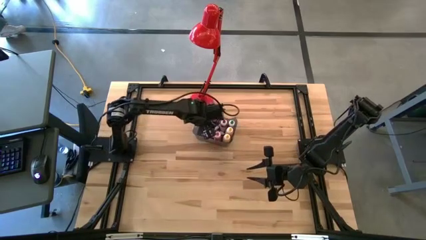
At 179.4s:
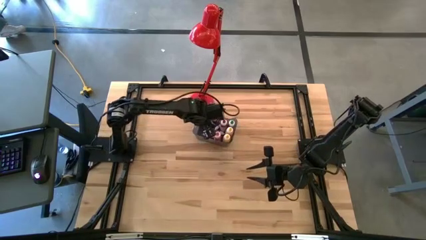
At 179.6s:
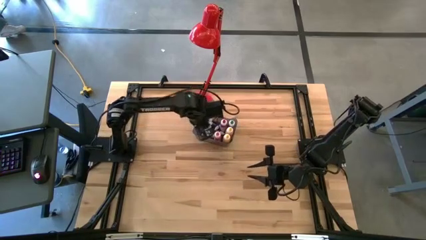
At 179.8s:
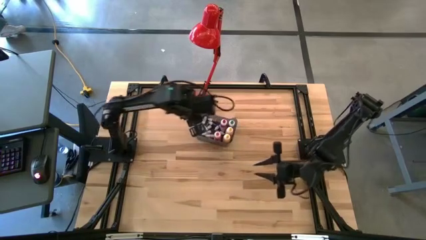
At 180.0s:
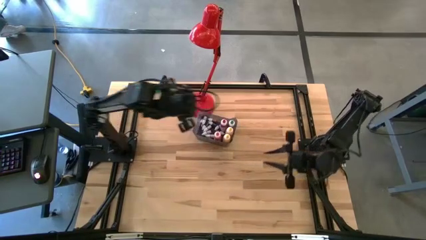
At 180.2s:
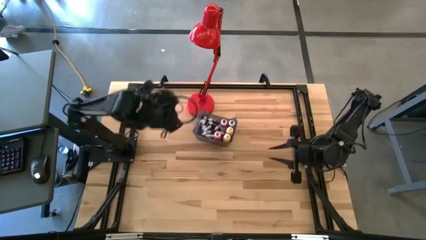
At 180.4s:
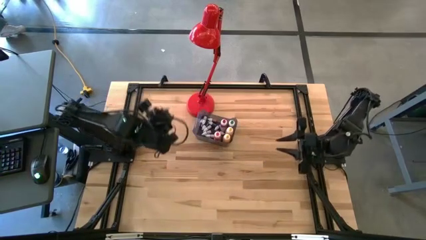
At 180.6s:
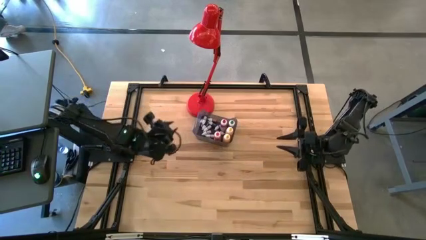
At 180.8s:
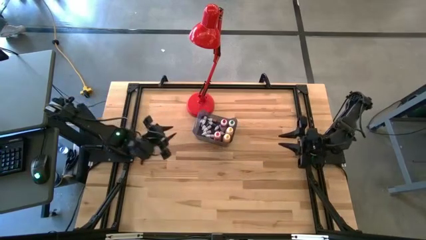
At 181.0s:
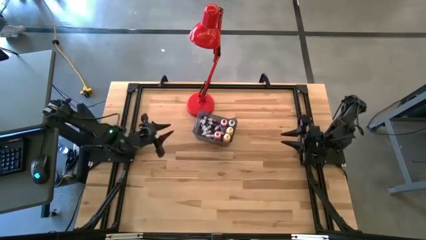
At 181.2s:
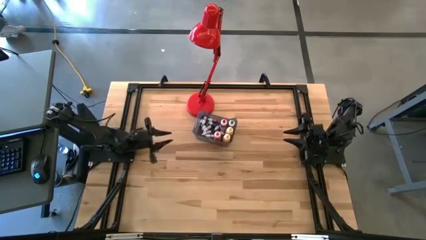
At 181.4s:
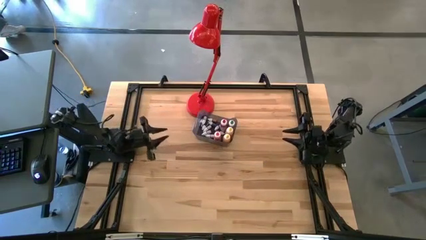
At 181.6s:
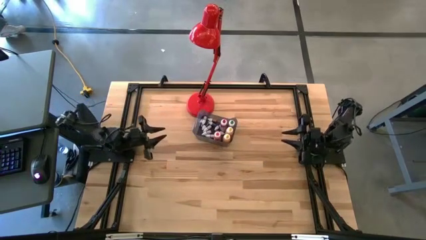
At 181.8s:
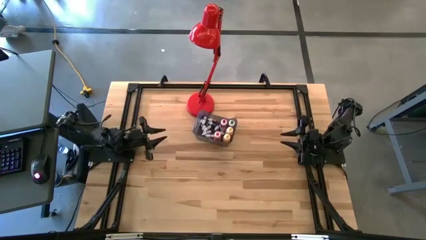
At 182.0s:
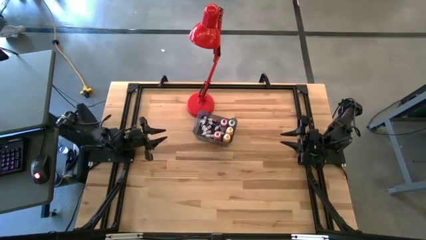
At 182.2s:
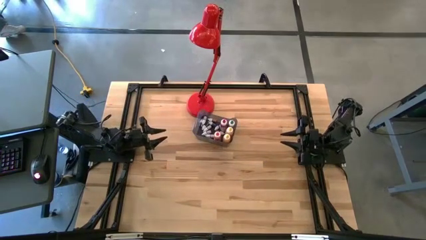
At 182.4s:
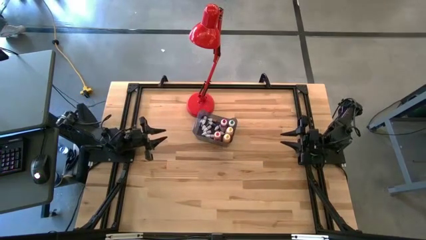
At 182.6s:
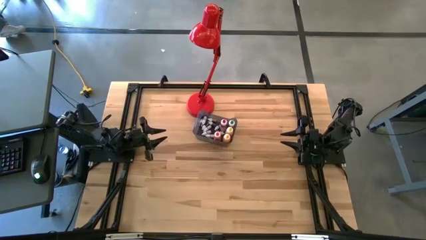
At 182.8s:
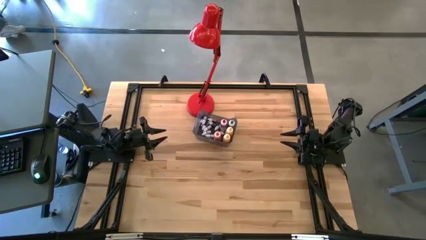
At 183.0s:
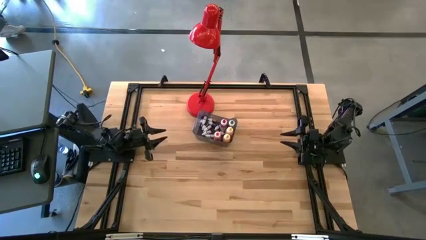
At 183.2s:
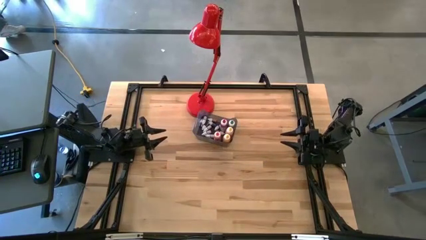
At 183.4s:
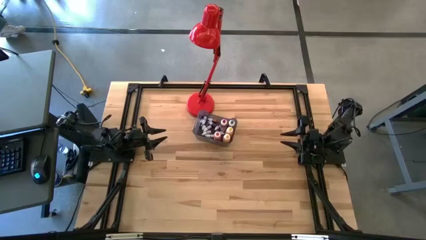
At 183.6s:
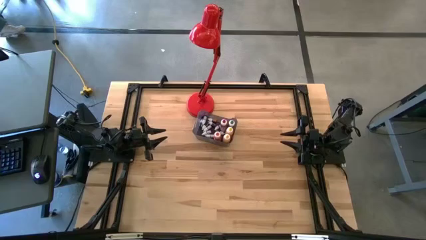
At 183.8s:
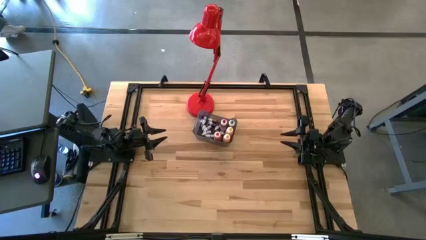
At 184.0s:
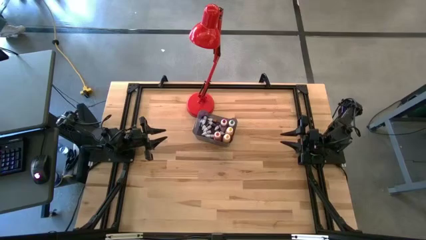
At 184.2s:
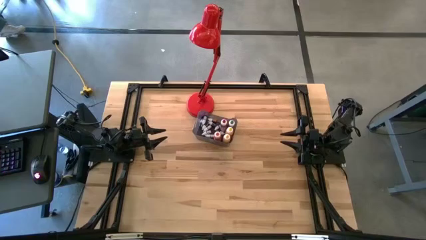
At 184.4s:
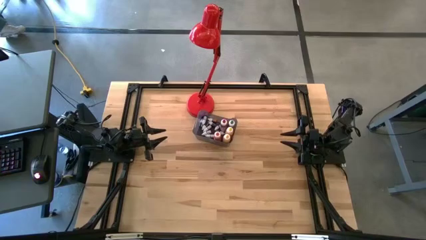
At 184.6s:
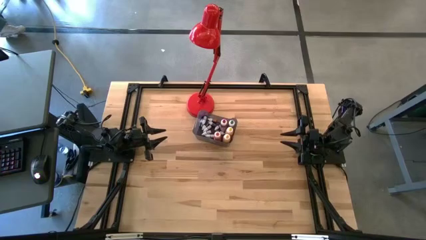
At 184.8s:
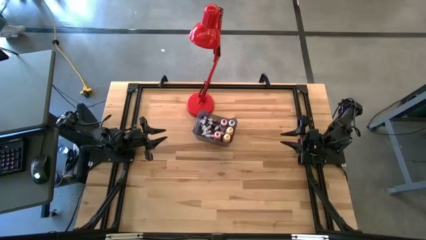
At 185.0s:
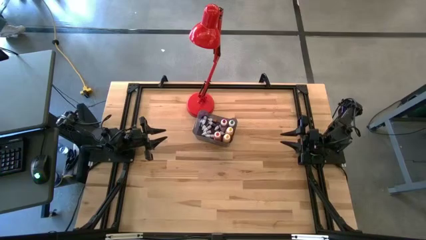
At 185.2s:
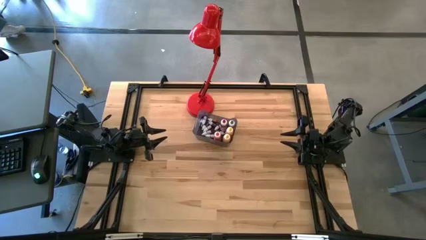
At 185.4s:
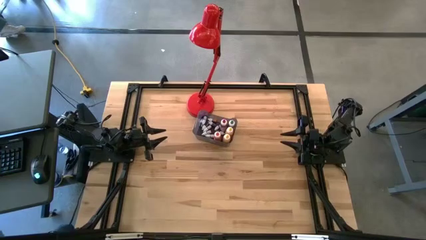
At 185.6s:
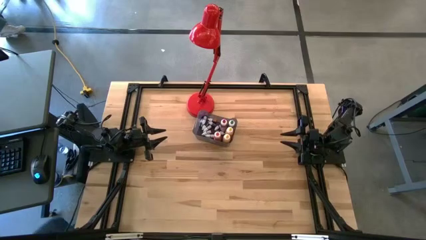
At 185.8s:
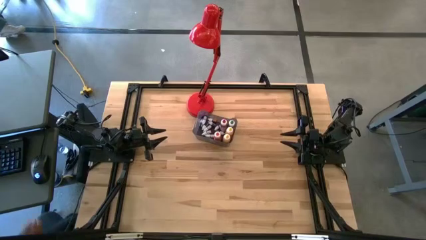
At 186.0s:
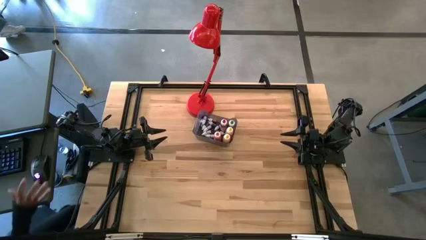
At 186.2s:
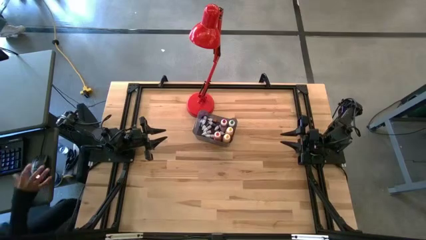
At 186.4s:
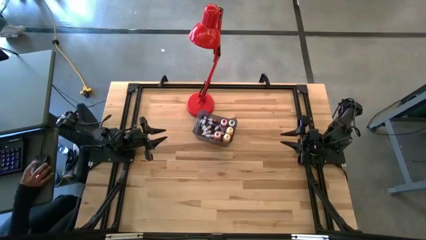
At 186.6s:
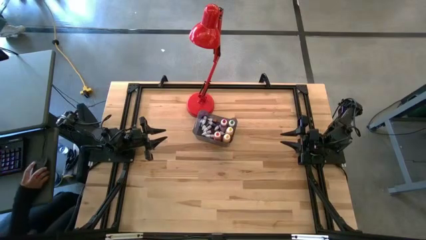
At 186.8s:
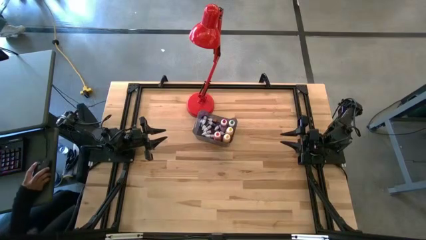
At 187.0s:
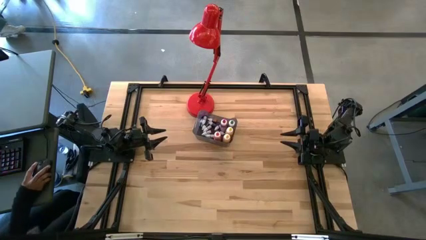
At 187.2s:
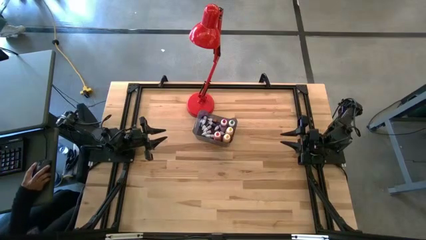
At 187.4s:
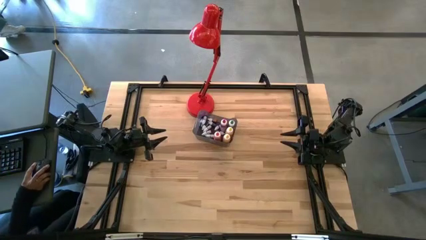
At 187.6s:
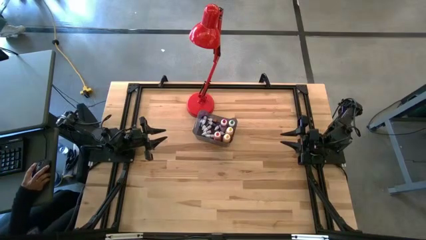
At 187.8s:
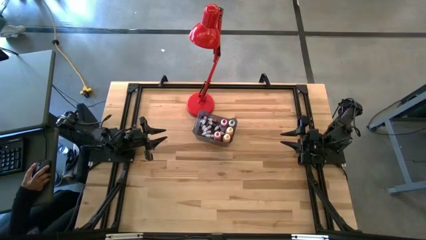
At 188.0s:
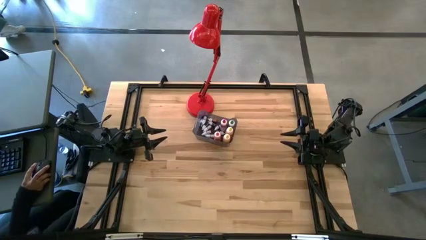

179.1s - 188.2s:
Task: Pick & Place food coloring
Return to Home Position

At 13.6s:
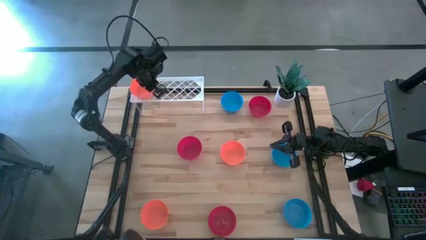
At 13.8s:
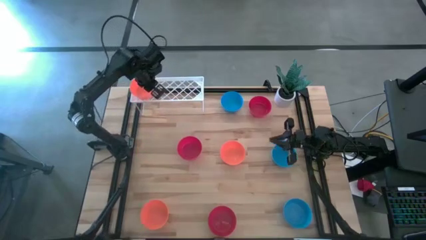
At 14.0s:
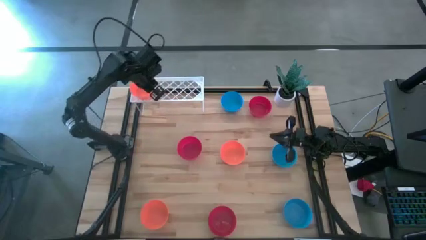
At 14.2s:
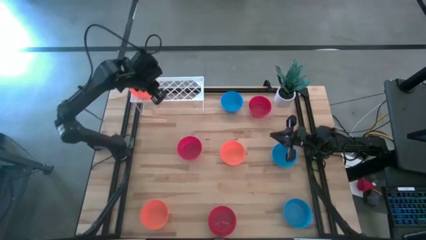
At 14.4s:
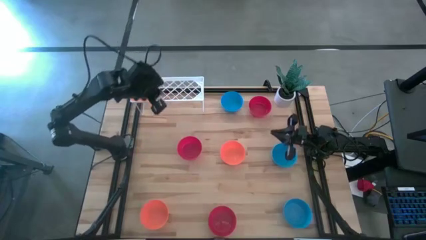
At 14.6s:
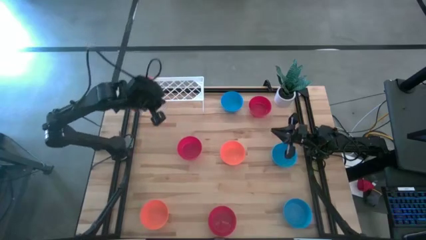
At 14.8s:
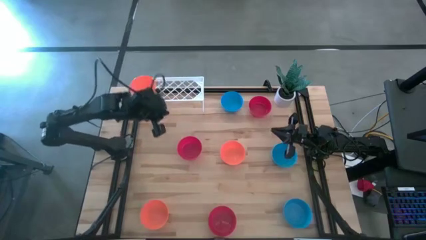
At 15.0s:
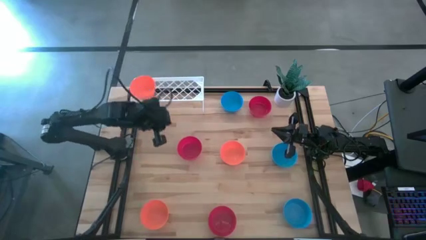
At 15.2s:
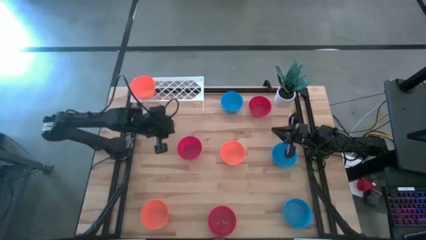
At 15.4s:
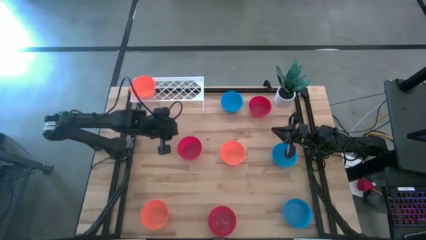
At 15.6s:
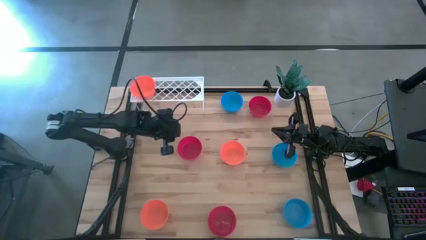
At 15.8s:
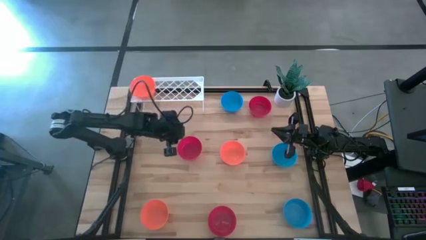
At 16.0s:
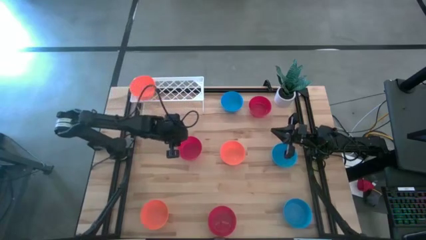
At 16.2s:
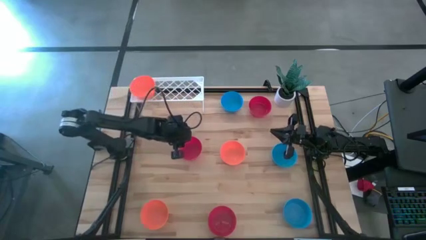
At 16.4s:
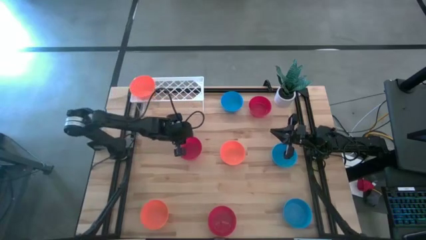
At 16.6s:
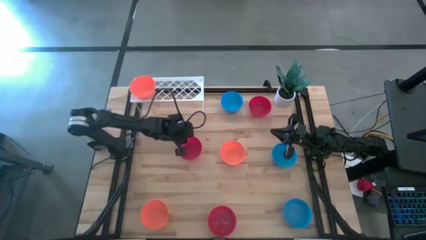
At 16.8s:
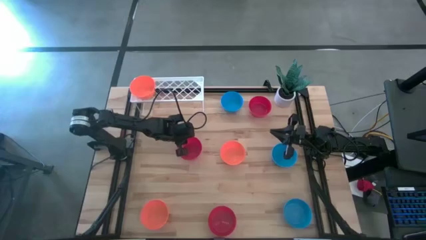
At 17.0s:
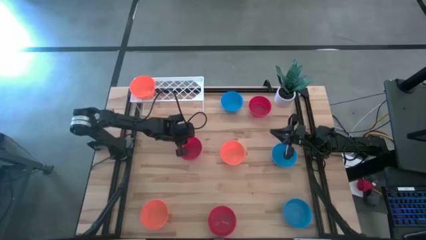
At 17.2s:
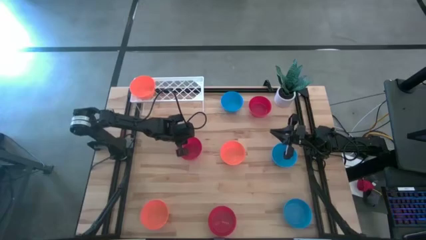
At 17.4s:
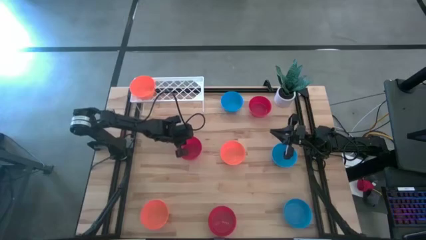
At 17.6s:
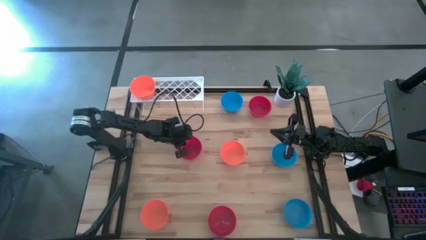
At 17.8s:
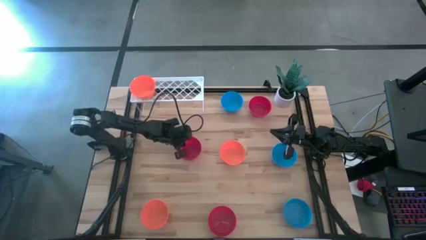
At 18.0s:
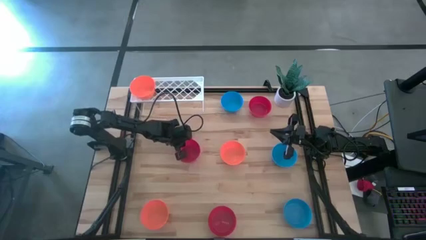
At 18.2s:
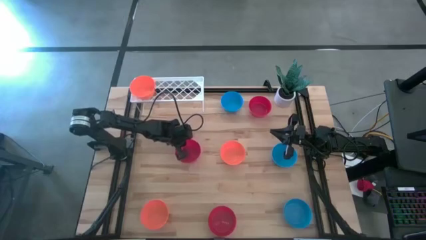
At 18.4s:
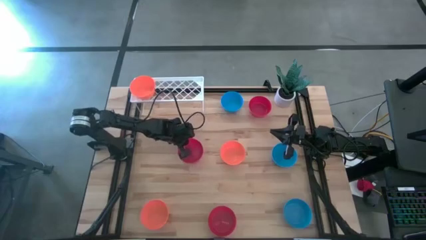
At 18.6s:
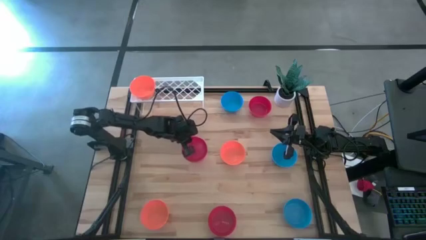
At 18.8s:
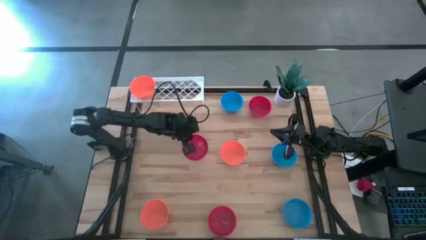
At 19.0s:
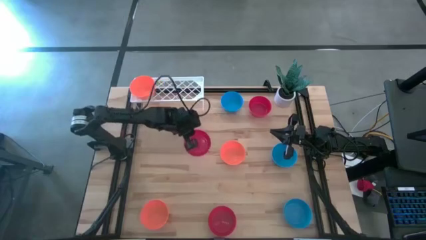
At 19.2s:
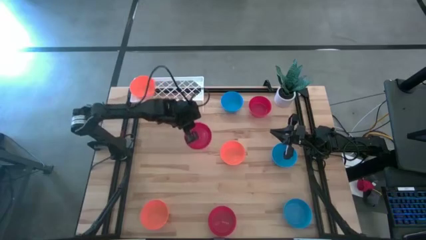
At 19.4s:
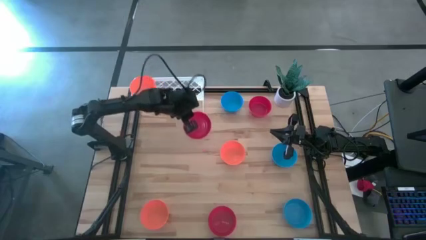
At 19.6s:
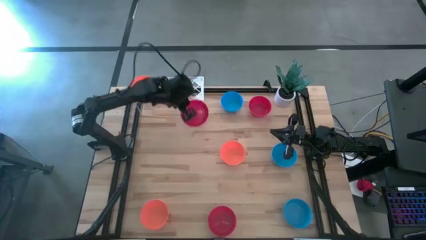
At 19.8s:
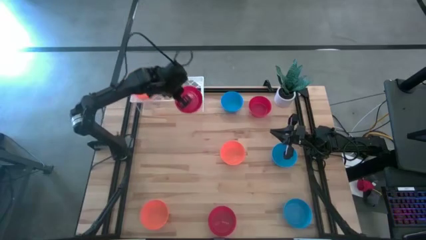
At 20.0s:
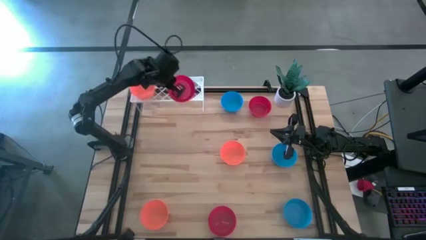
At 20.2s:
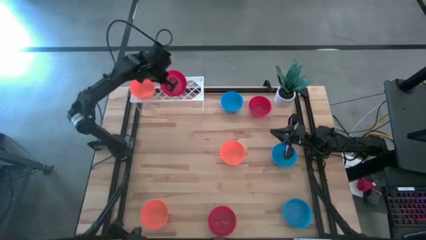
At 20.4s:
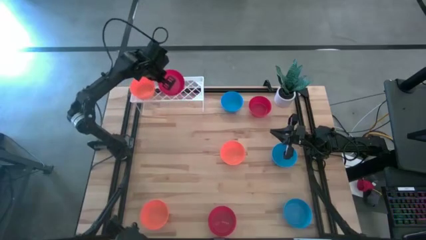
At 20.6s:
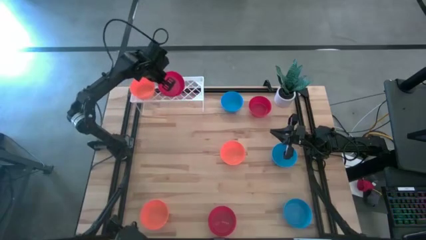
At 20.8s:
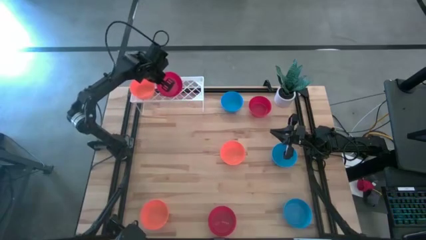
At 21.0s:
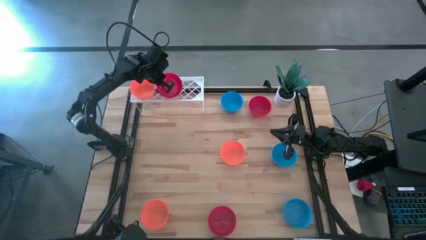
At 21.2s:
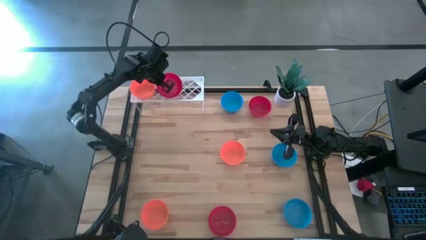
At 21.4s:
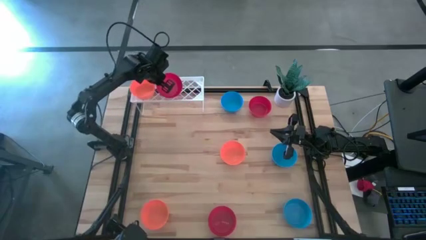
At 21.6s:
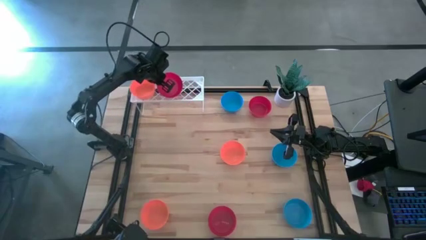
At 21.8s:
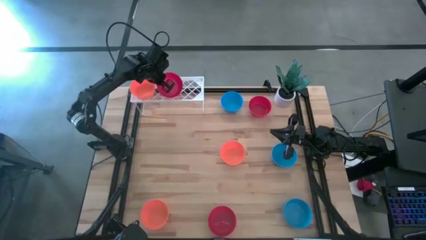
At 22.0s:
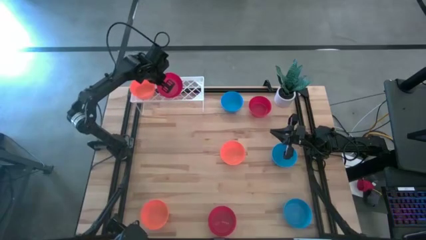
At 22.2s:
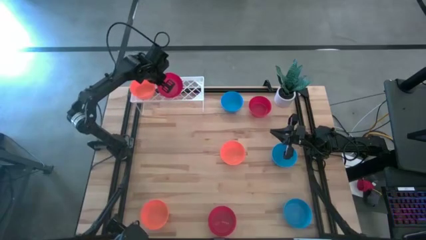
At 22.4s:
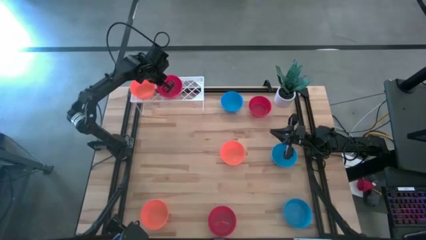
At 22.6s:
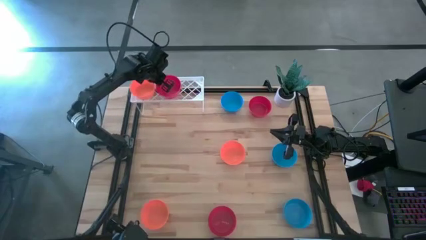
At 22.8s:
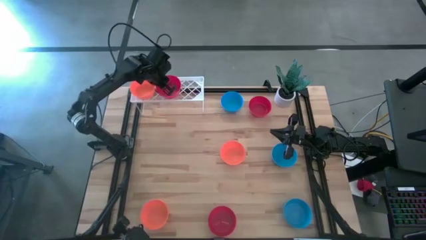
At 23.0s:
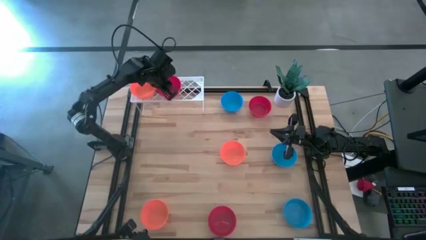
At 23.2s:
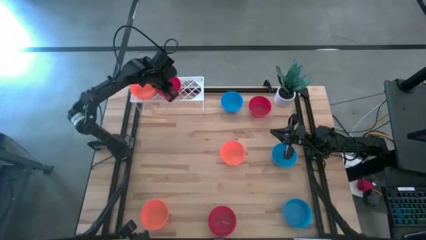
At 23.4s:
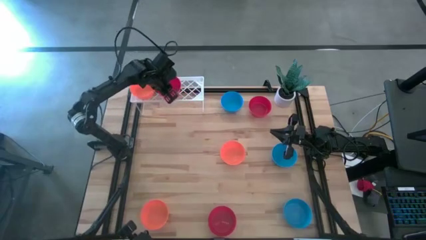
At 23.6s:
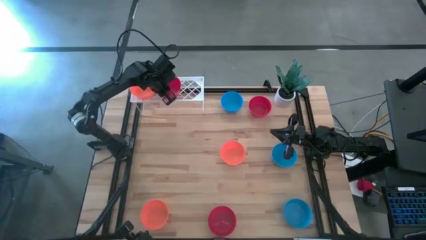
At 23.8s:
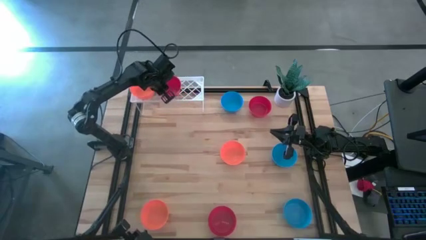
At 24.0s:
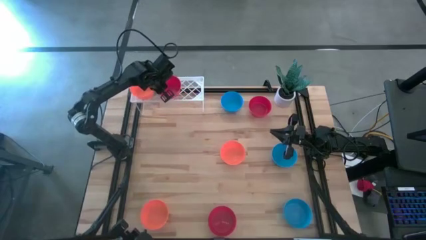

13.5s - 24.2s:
Task: Pick & Place Mini bowls
Put the middle red bowl on the shelf
